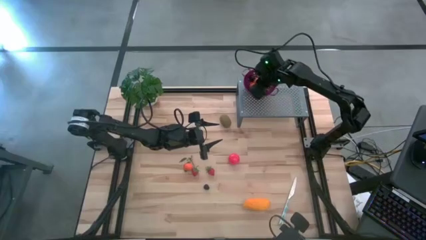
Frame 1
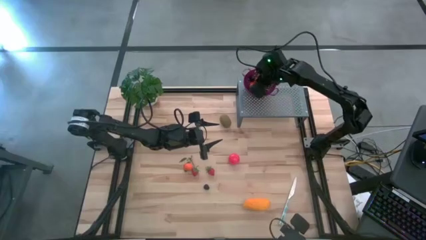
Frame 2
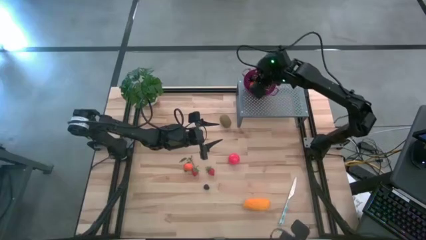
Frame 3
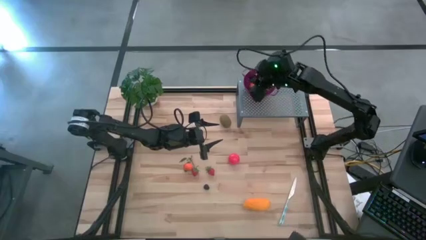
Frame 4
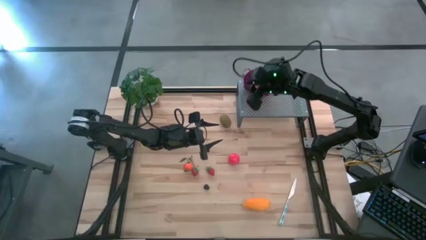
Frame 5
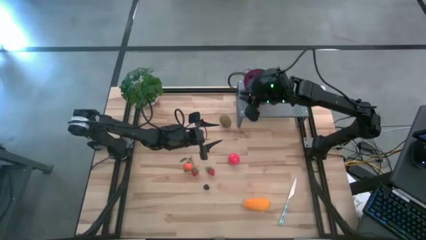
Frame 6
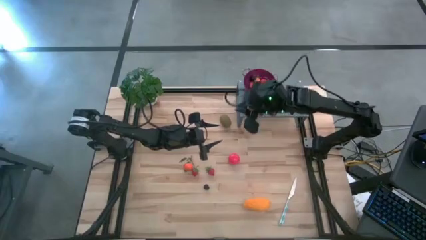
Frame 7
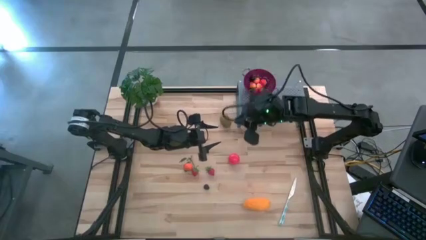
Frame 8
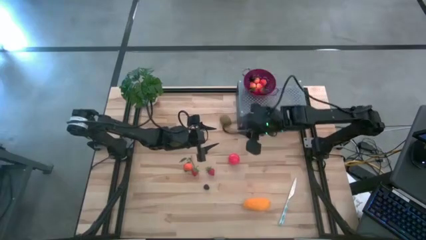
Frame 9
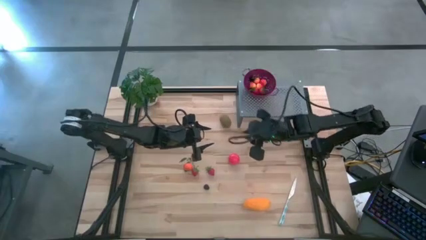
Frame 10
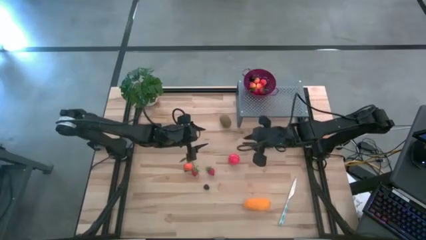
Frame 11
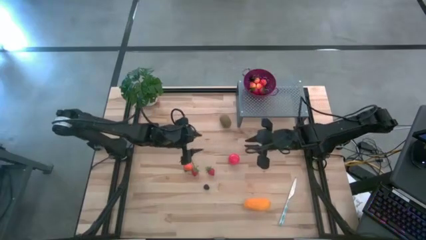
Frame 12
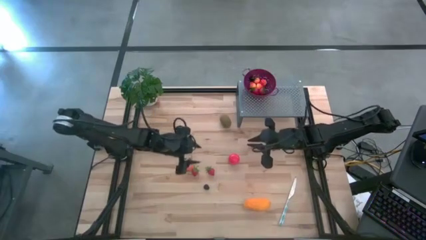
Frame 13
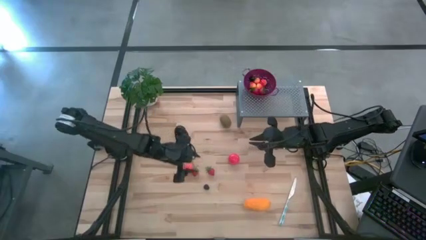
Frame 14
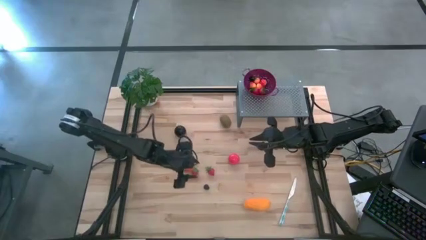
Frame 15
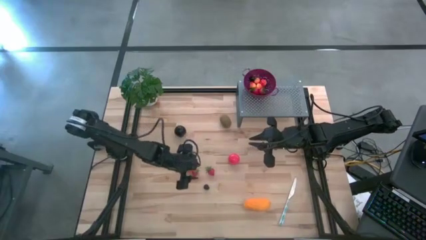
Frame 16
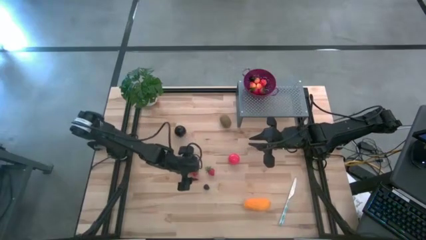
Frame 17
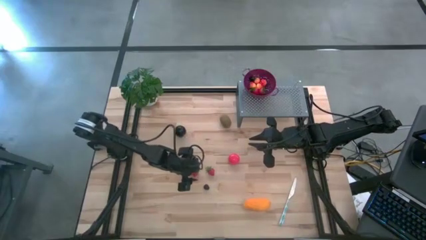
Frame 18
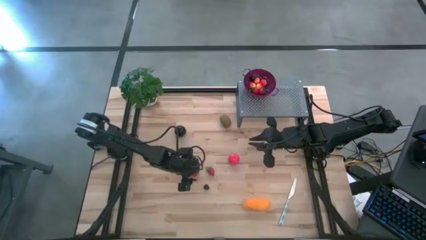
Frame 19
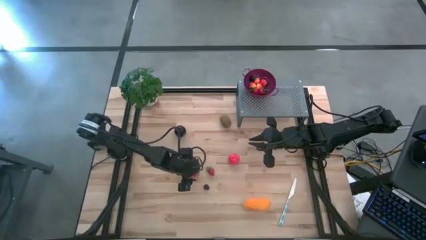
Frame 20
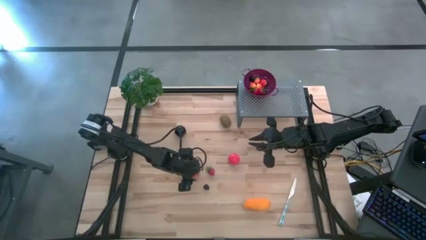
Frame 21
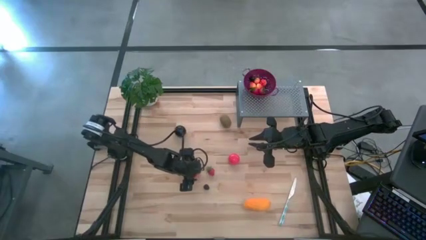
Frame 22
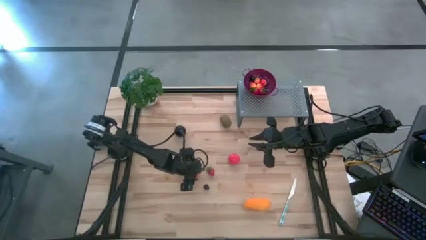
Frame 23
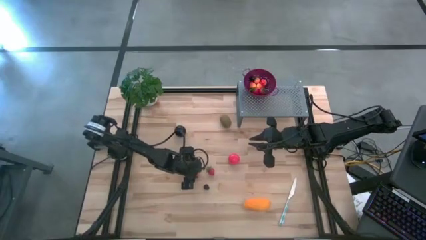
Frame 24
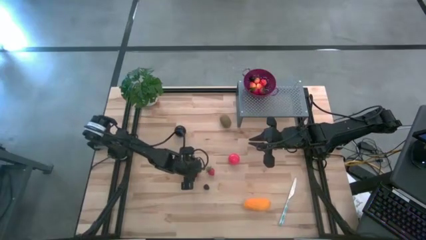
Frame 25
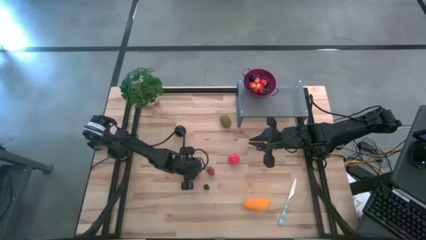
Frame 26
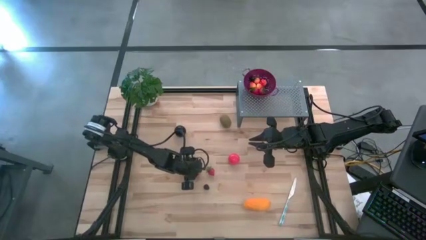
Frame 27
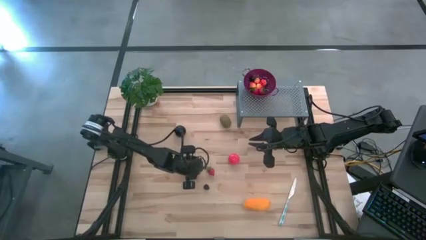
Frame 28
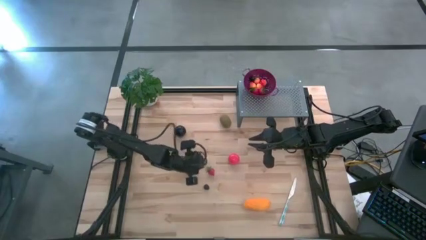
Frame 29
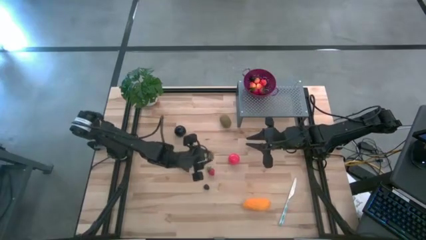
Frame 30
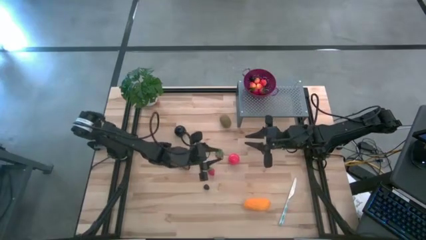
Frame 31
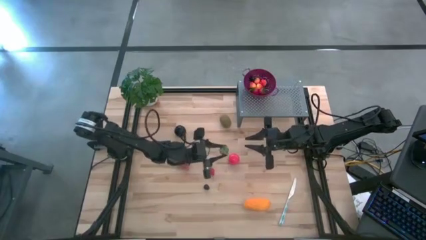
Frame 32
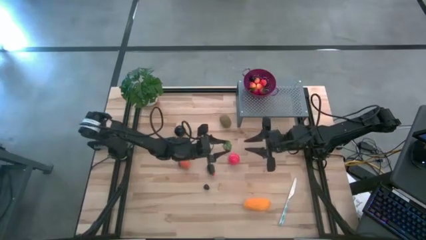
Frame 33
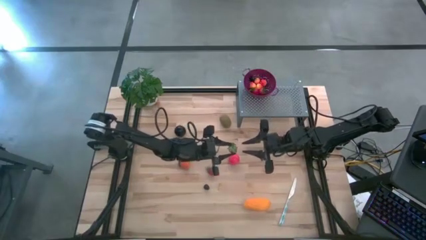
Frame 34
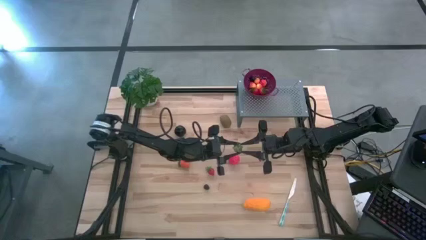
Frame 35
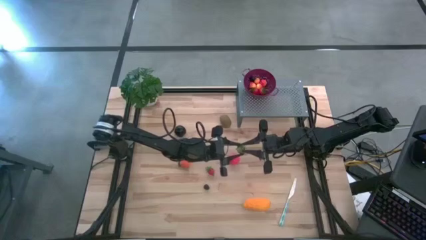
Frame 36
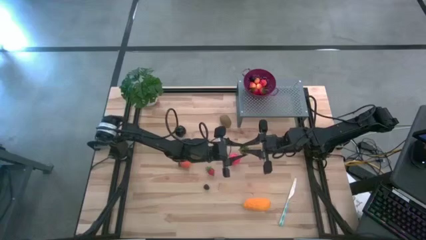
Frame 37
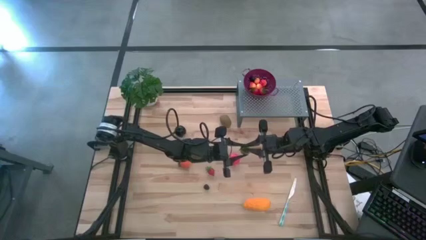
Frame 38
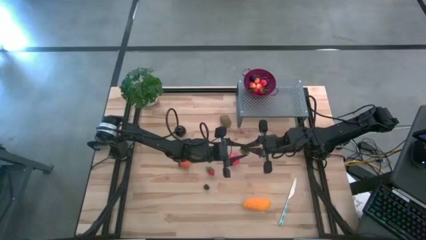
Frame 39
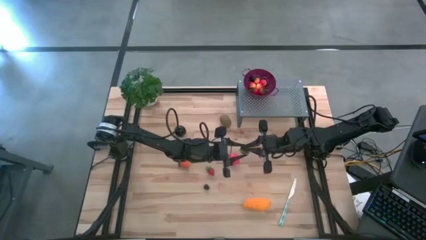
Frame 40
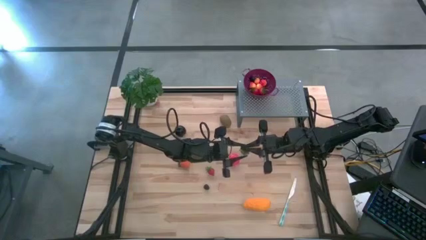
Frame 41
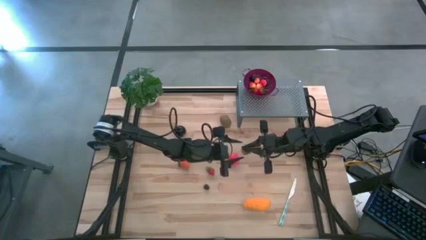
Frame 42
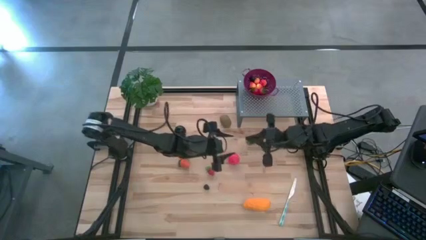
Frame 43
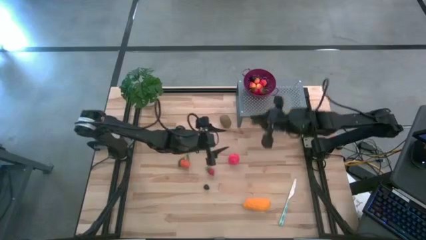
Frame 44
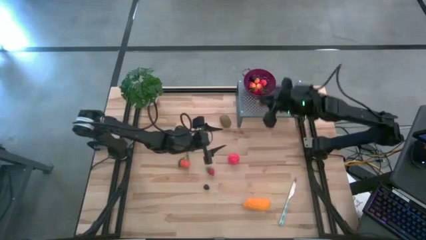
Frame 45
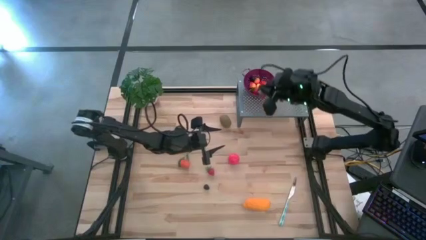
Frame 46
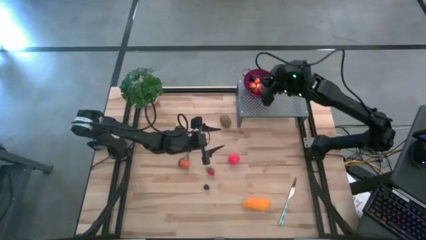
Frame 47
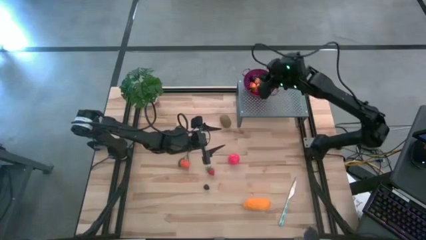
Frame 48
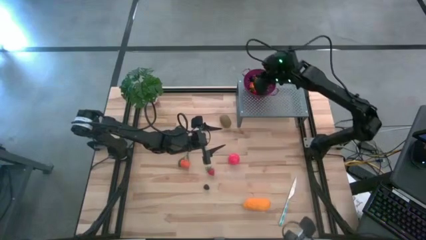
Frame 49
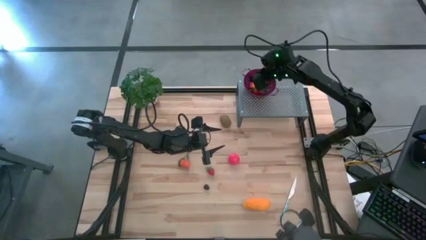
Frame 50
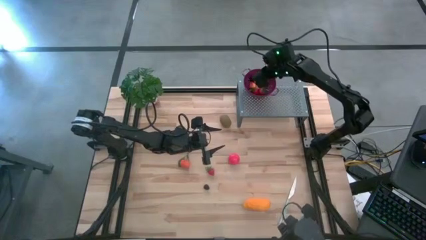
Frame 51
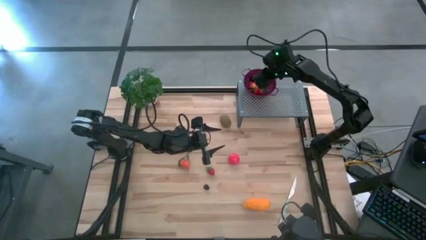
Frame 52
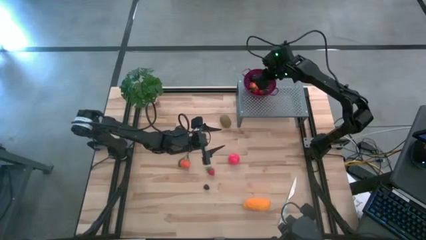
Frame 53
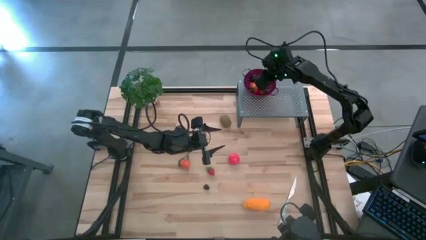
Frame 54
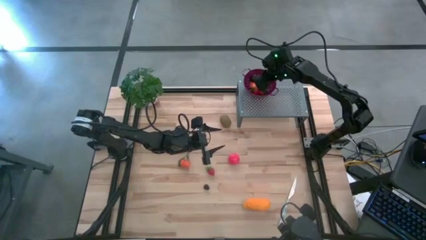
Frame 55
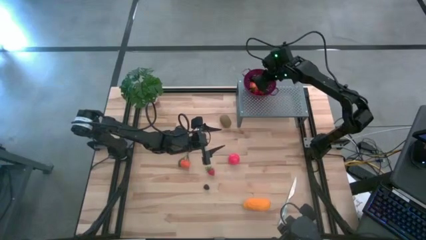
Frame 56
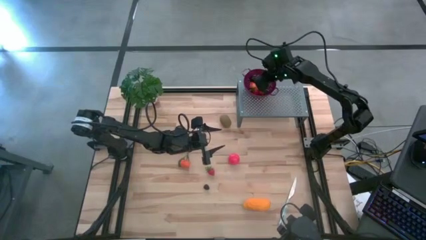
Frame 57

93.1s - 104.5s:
Task: Pick & Place Fruit
Put the strawberry into the violet strainer bowl on the shelf

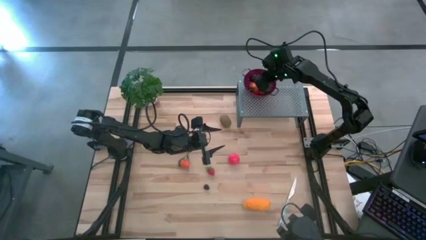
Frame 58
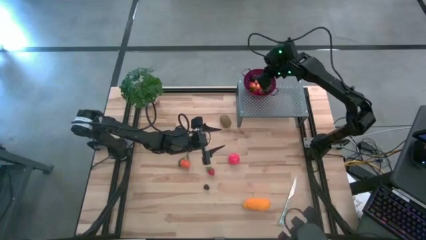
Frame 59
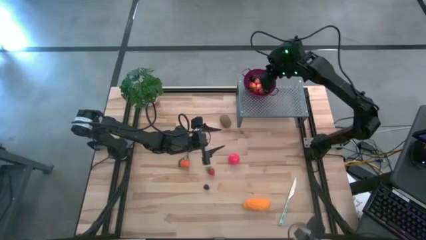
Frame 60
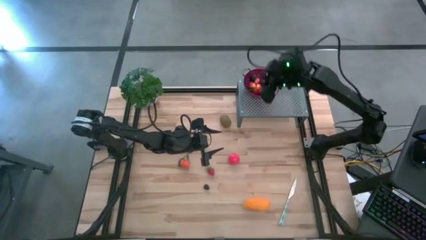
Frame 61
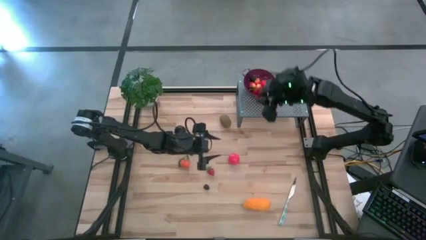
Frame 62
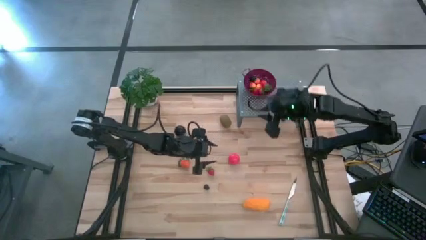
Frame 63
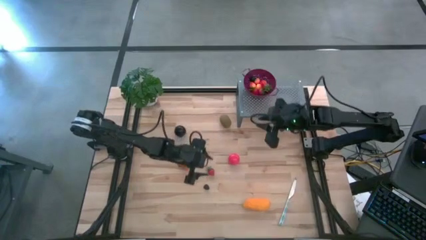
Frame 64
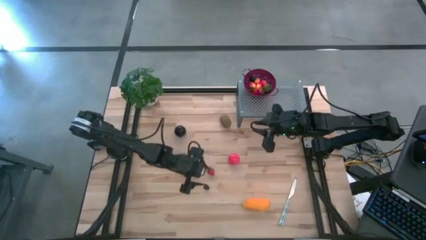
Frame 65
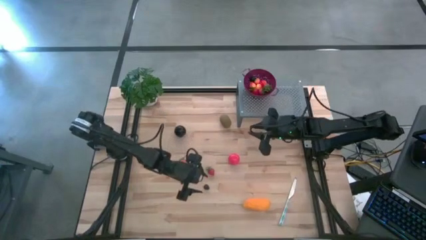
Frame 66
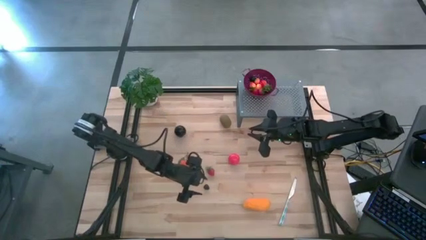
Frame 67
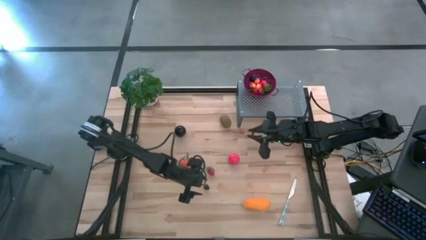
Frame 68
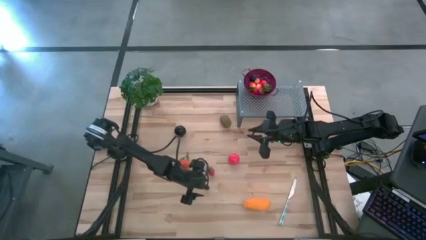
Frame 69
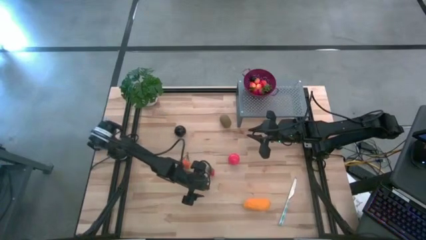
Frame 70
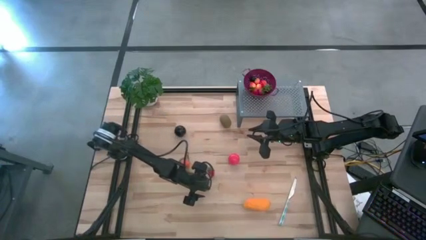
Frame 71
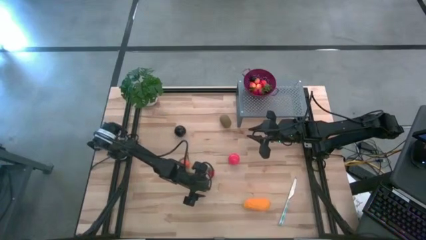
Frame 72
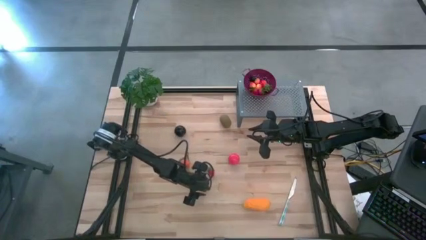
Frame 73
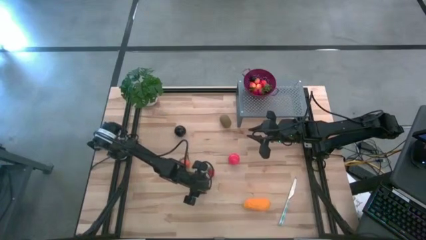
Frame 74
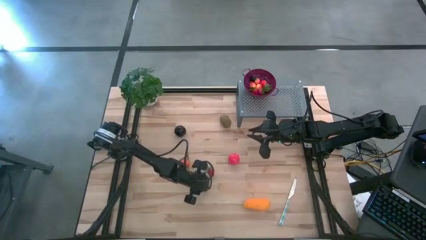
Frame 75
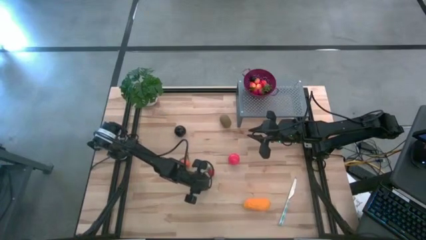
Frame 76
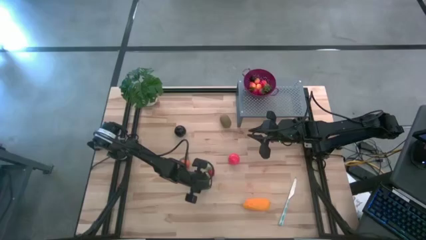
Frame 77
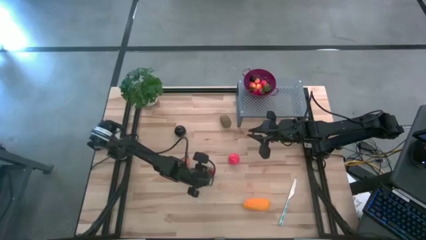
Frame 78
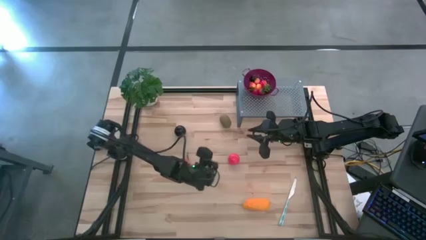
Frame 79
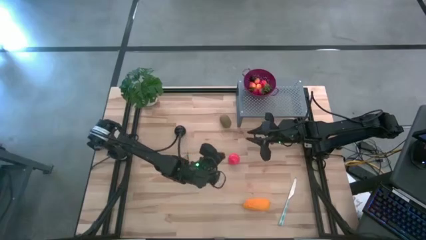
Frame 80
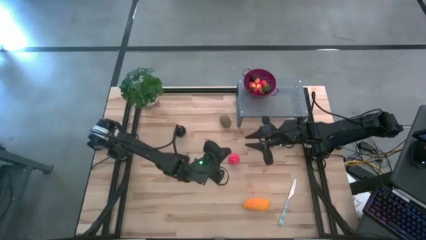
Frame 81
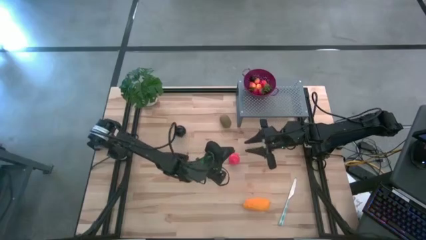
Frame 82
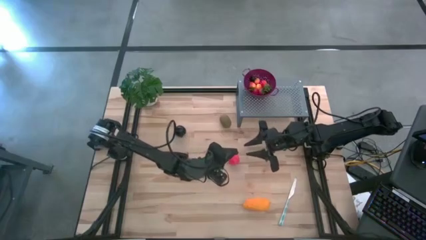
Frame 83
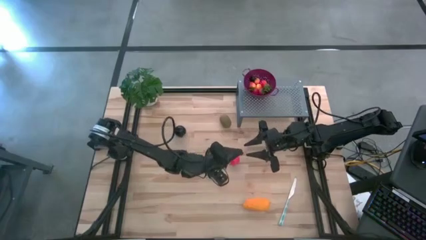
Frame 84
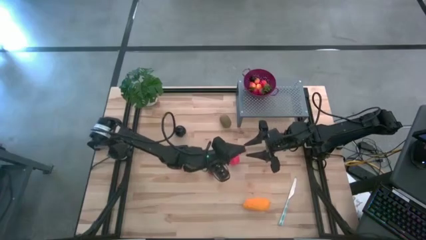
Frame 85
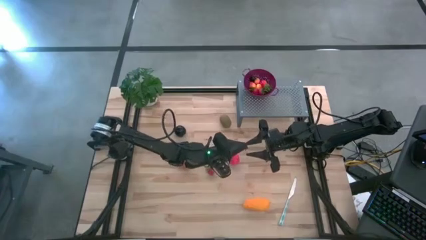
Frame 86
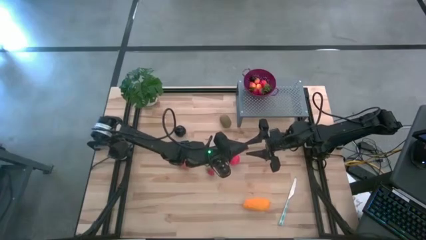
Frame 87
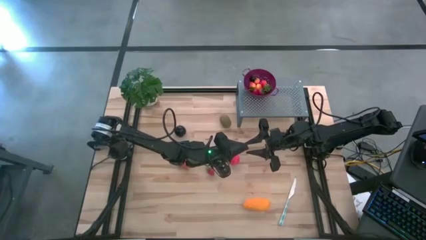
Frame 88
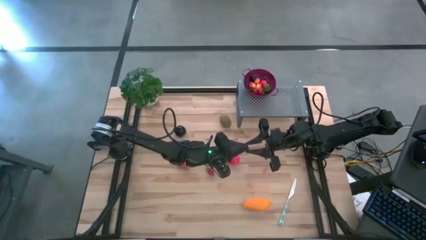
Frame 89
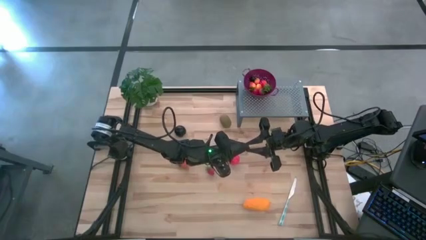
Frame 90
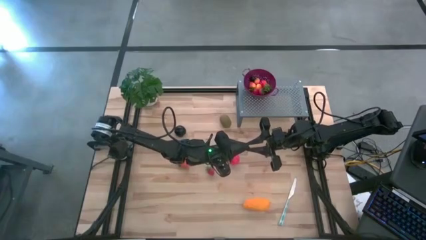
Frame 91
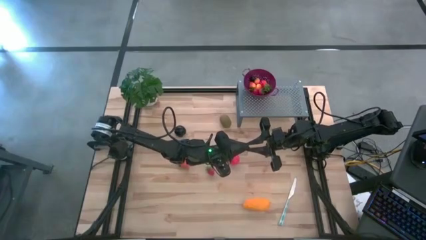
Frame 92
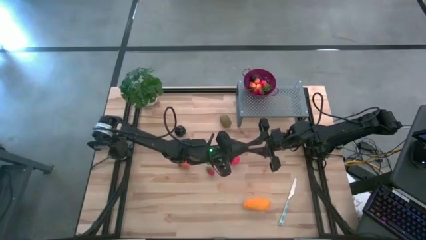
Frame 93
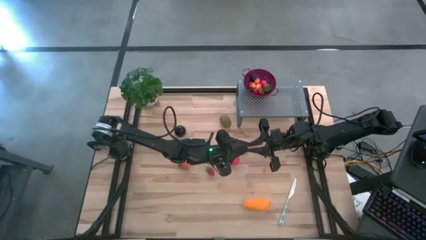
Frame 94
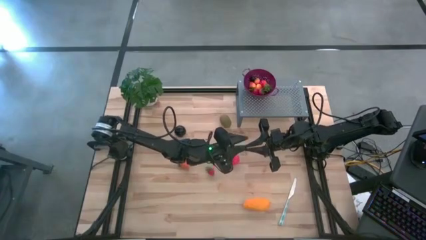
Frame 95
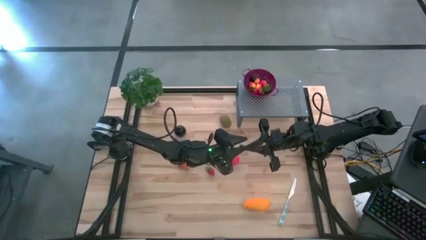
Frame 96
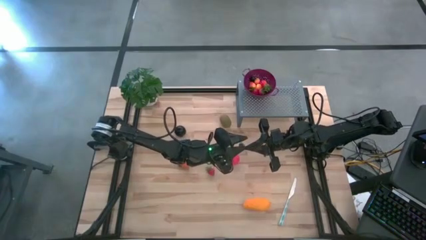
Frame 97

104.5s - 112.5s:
Put the blackberry into the violet strainer bowl on the shelf
